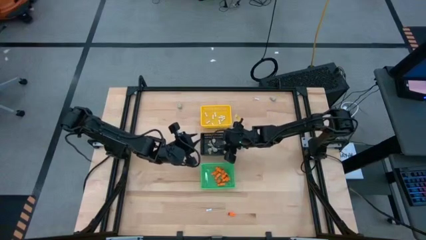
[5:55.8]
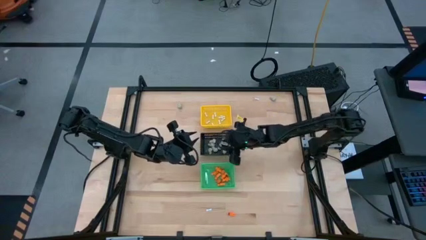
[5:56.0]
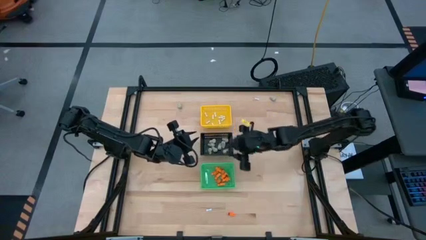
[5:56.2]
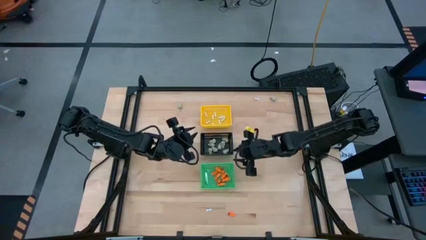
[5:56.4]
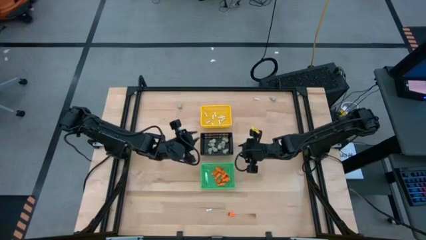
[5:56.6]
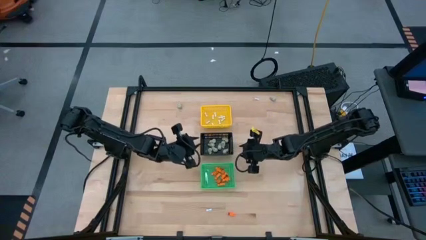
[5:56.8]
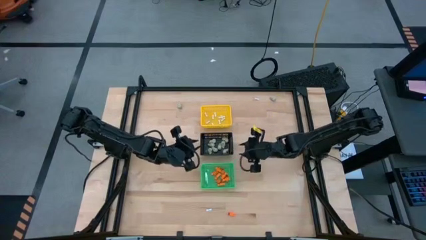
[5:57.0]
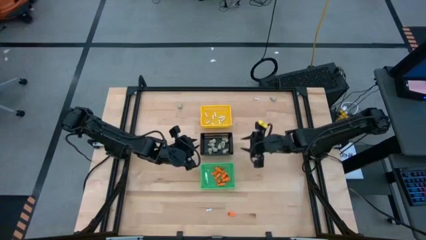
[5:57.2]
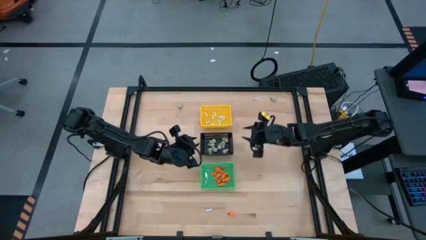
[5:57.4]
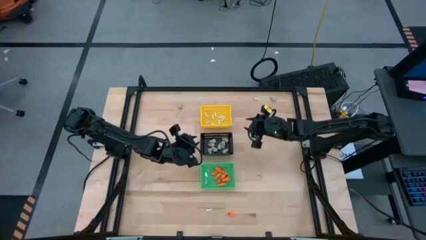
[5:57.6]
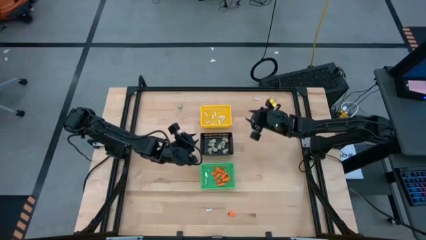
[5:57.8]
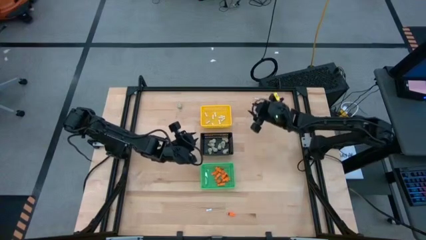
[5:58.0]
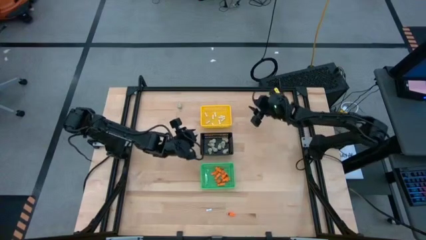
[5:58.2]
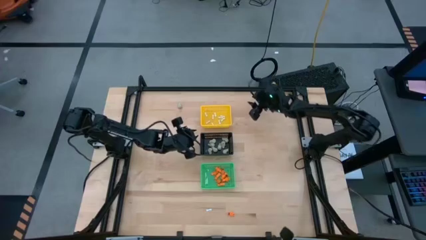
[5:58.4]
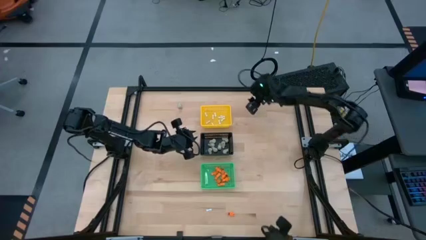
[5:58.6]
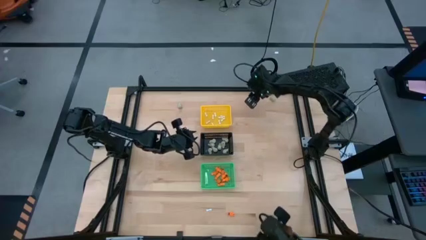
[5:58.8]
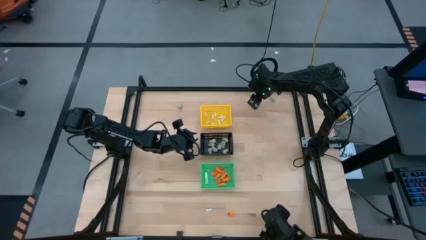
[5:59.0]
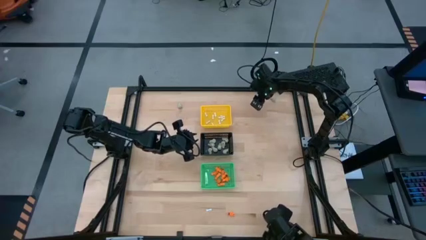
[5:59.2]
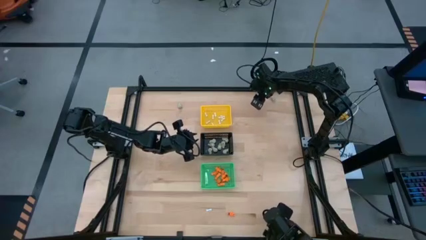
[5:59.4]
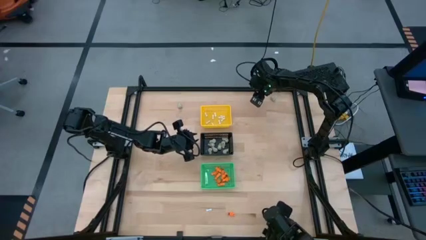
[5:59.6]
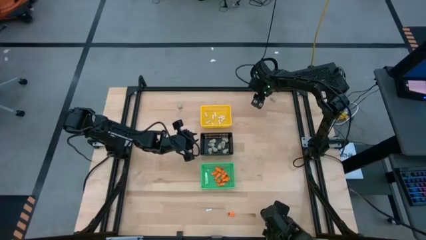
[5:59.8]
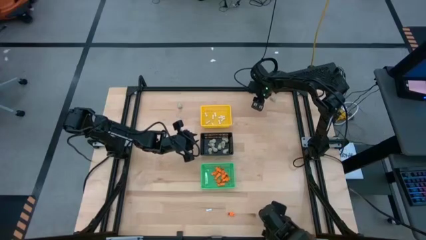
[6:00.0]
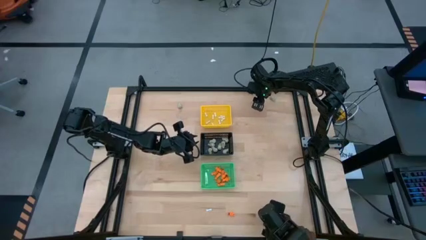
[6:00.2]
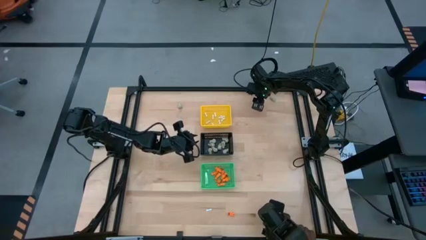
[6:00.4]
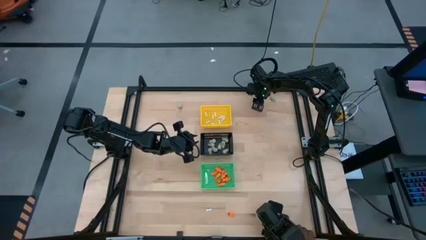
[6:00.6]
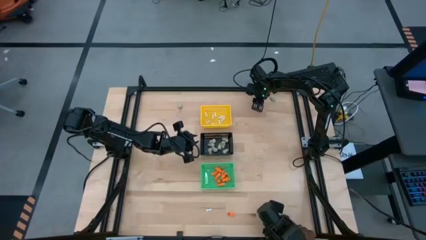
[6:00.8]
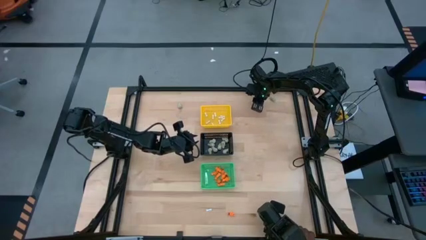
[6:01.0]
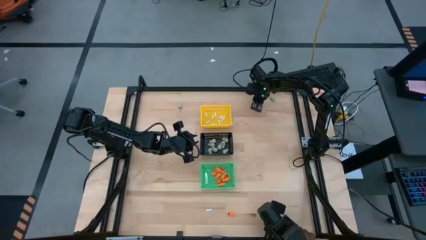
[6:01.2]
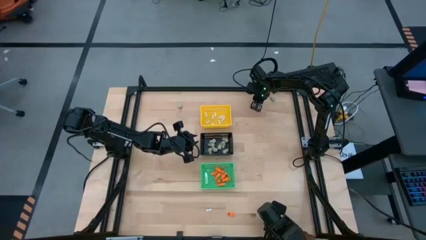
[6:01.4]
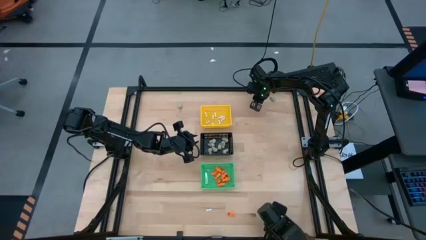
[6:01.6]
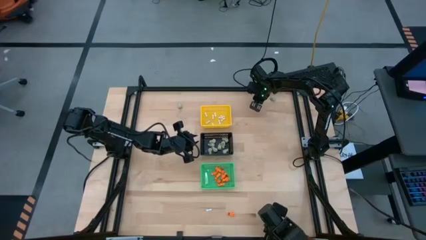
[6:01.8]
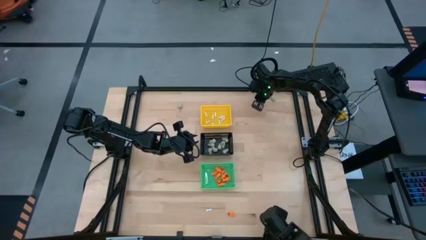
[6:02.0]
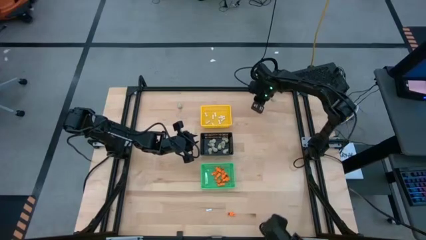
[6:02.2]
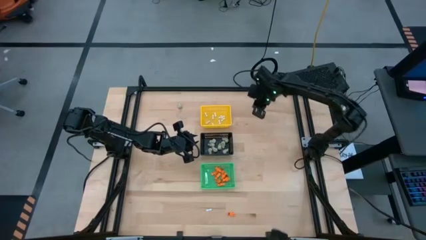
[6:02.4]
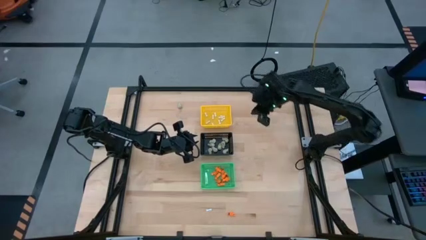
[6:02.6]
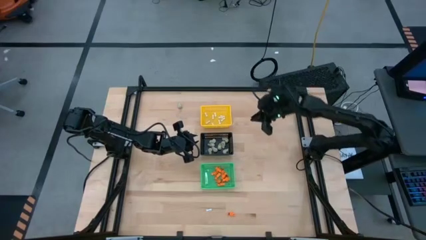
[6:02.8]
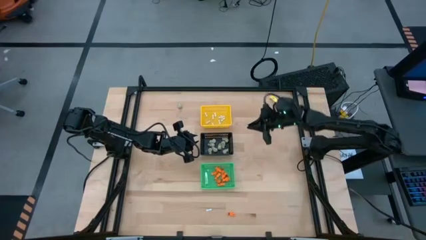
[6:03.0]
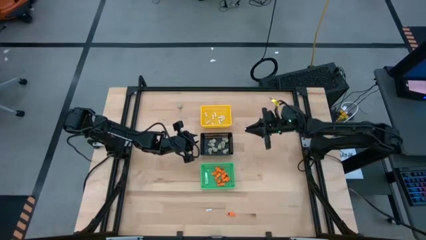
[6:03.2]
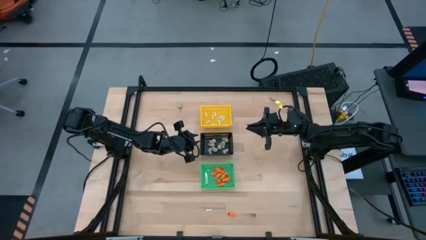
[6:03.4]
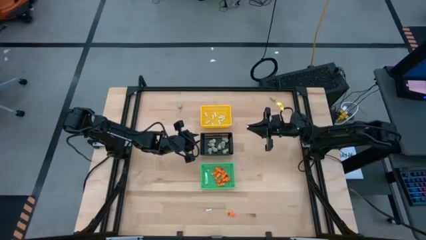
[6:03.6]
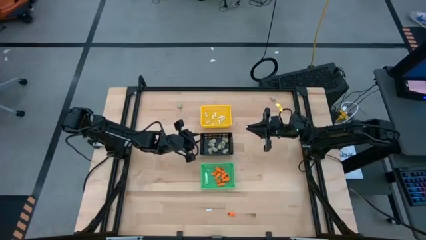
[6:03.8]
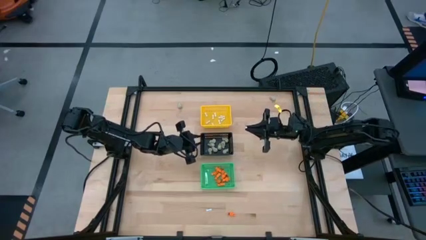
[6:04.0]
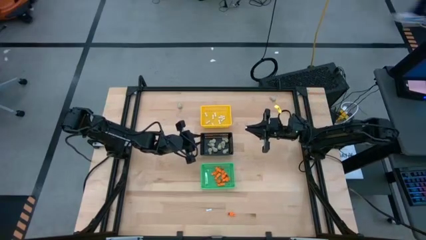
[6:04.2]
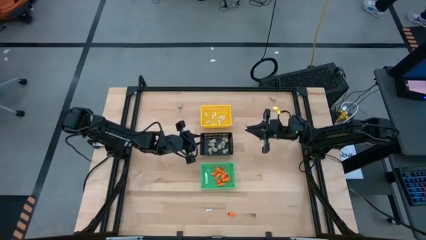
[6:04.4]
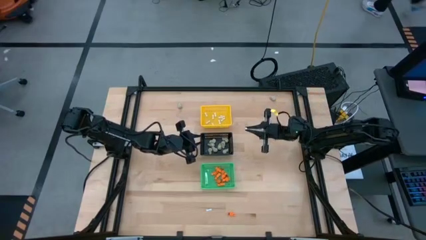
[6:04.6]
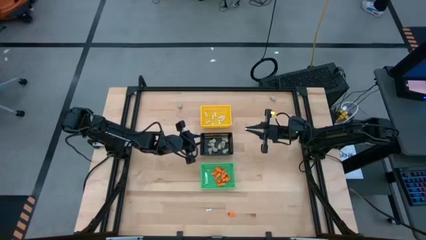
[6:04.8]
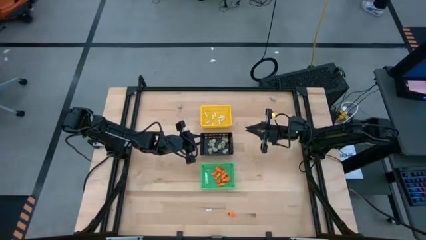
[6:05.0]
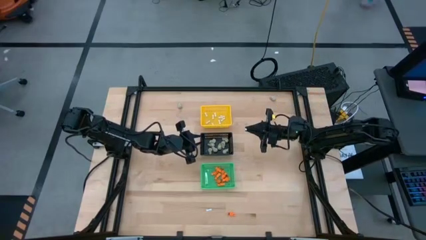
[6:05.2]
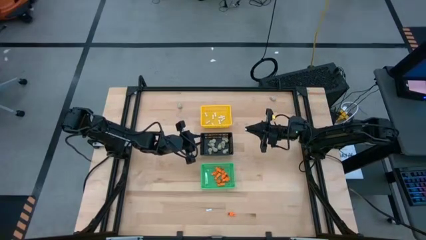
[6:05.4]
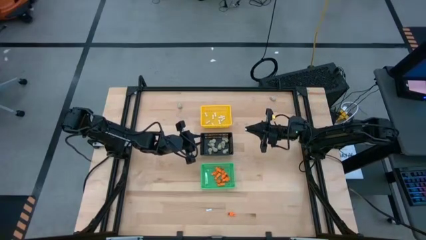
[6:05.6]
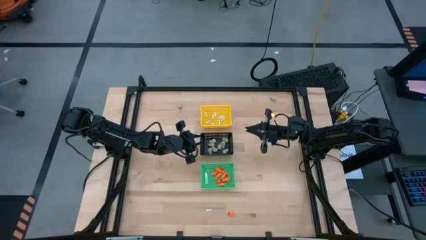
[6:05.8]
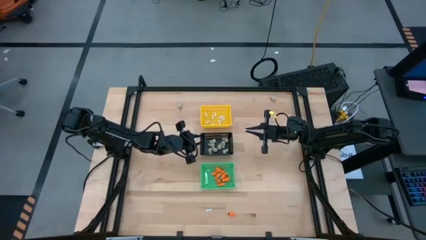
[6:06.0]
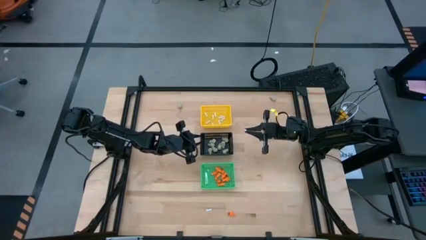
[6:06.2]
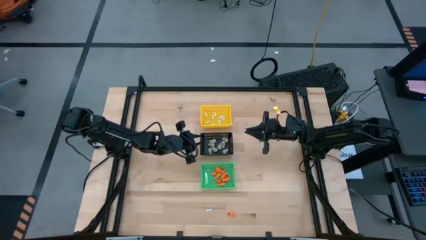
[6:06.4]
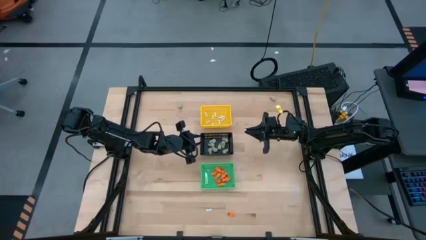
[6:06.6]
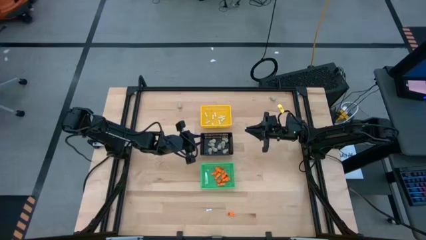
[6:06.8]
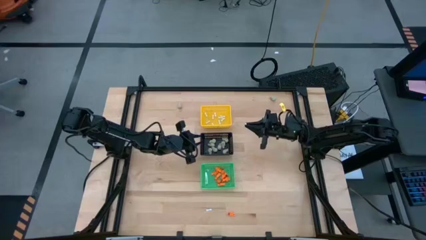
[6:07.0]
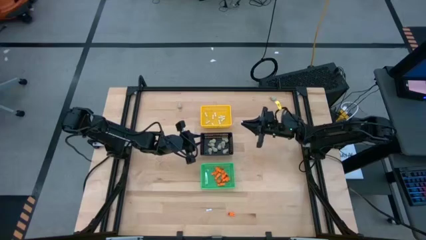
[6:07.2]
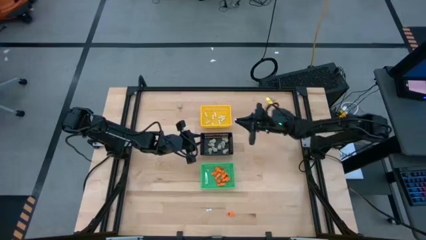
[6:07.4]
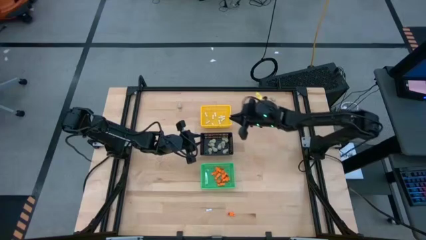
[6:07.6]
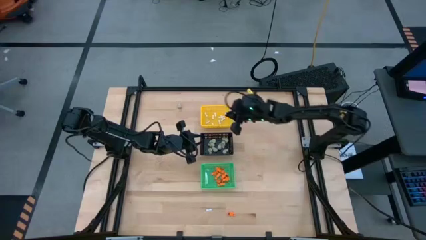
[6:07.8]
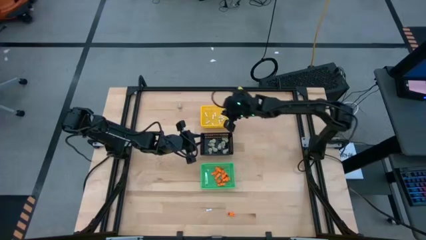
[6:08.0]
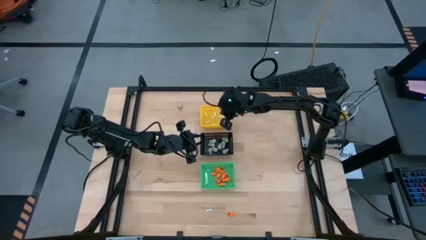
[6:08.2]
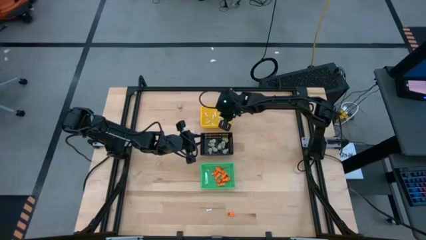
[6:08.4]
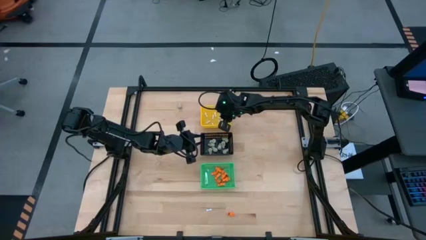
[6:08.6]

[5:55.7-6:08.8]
Task: Sort Halloween decoration
Put the white bone toy into the yellow basket
